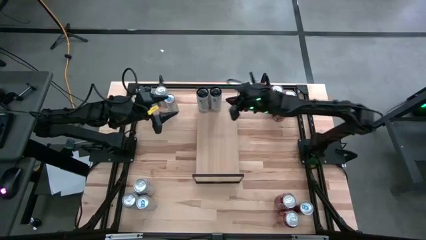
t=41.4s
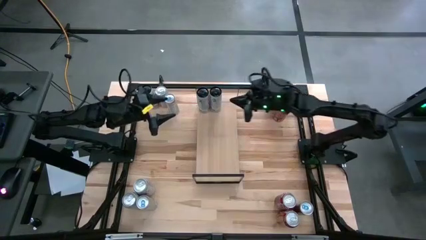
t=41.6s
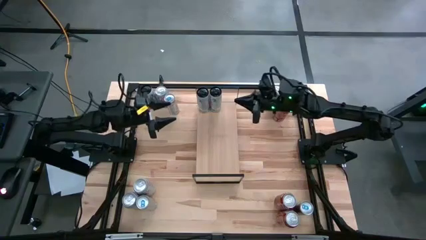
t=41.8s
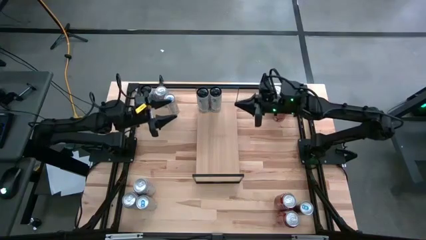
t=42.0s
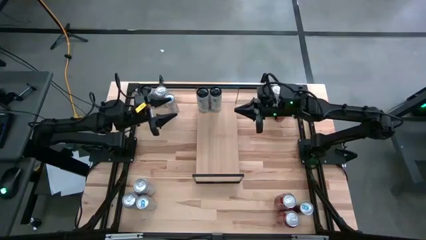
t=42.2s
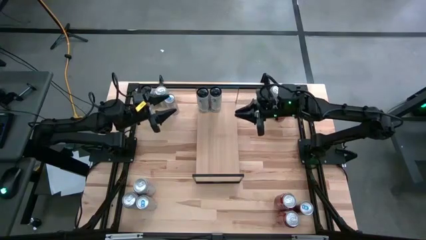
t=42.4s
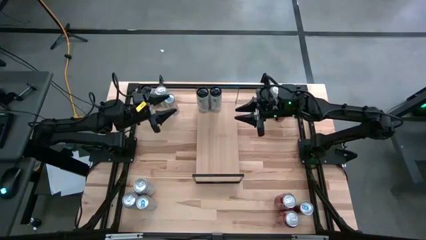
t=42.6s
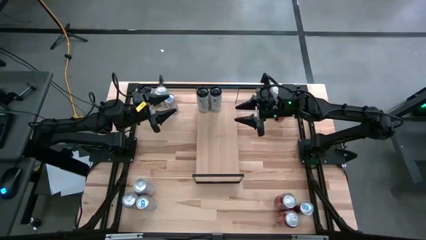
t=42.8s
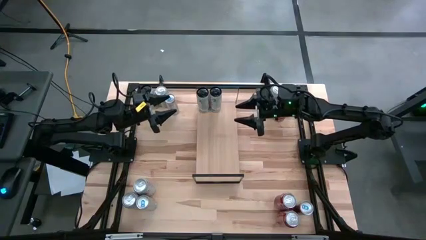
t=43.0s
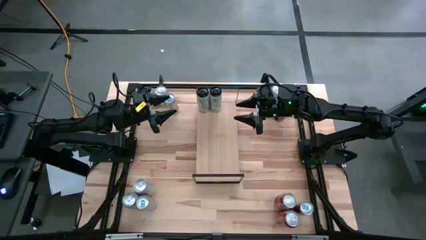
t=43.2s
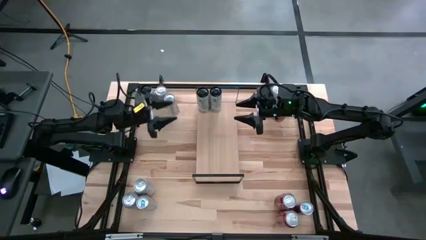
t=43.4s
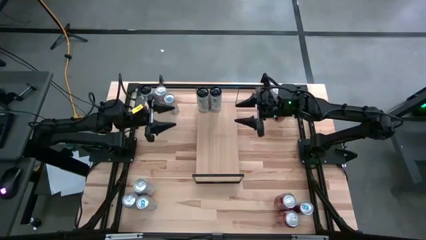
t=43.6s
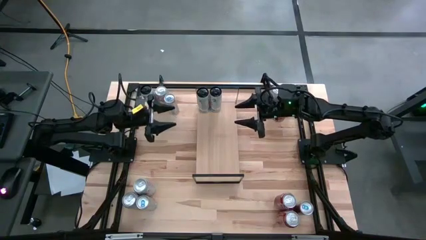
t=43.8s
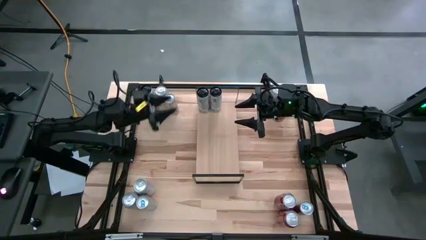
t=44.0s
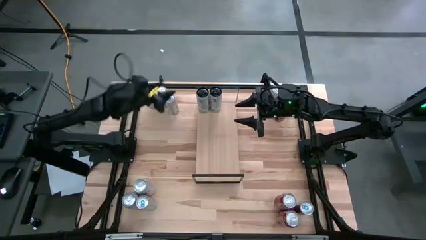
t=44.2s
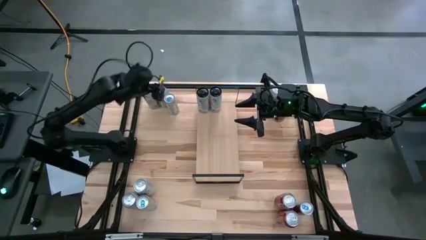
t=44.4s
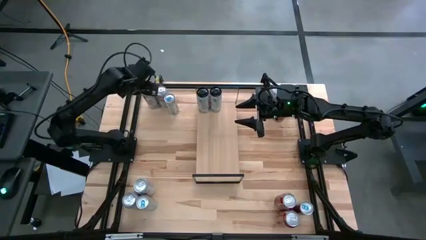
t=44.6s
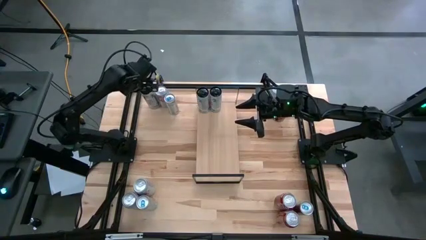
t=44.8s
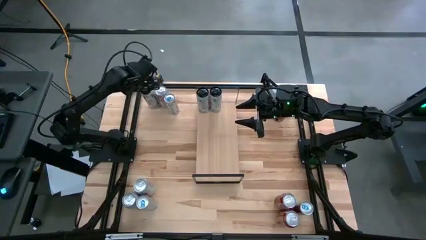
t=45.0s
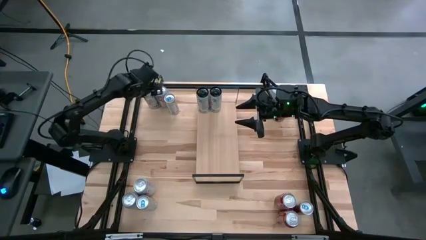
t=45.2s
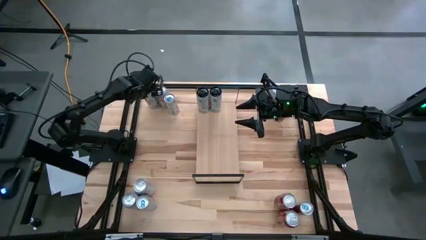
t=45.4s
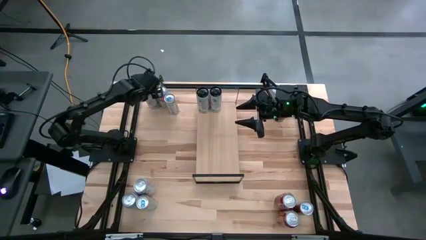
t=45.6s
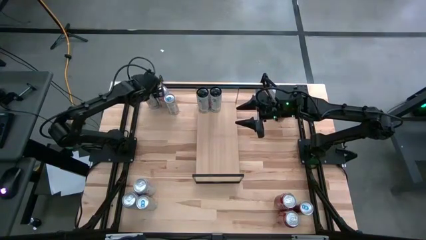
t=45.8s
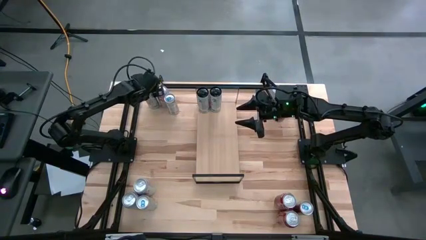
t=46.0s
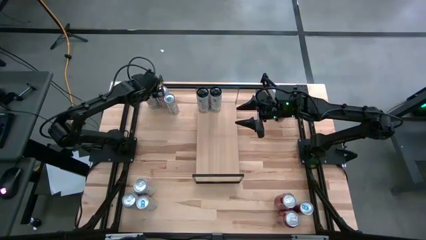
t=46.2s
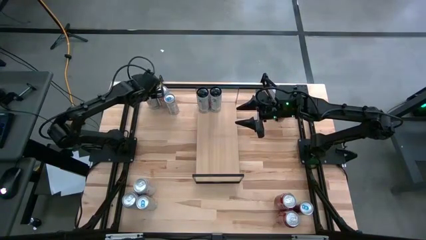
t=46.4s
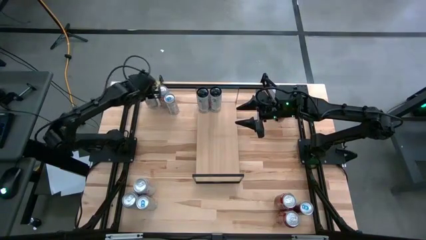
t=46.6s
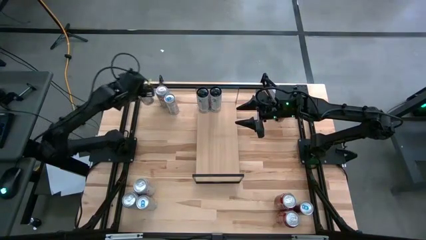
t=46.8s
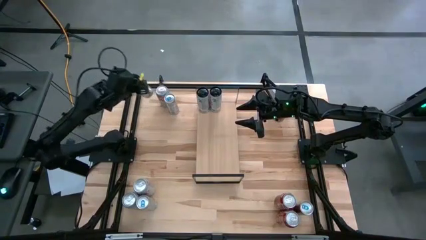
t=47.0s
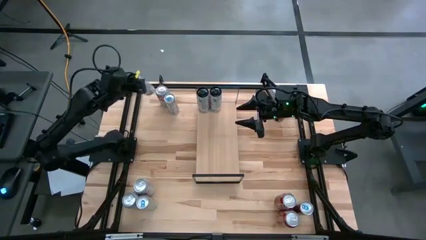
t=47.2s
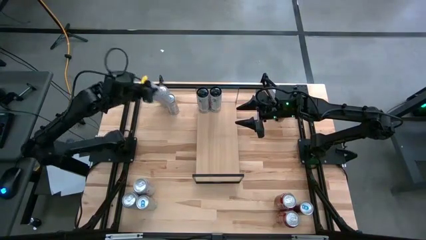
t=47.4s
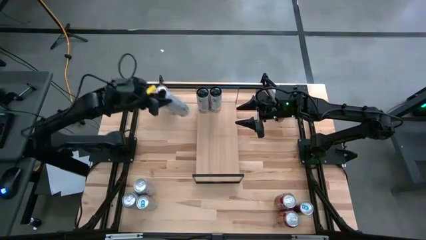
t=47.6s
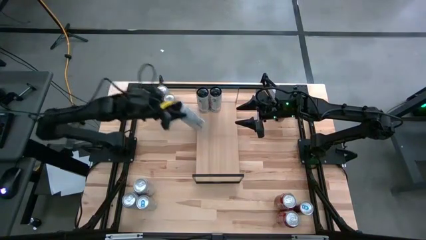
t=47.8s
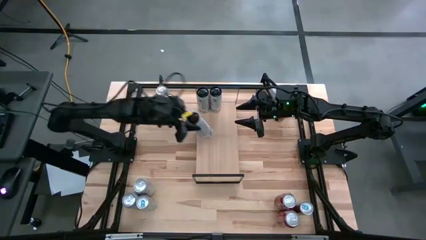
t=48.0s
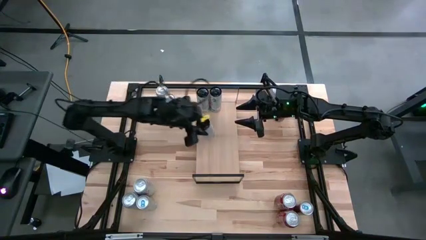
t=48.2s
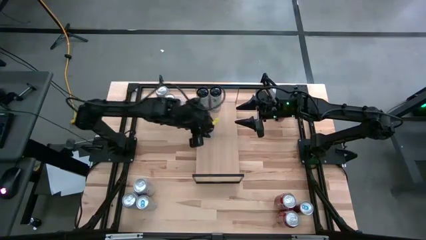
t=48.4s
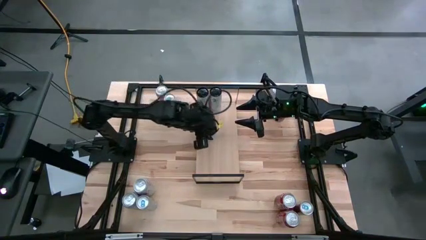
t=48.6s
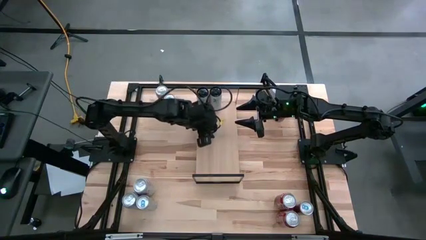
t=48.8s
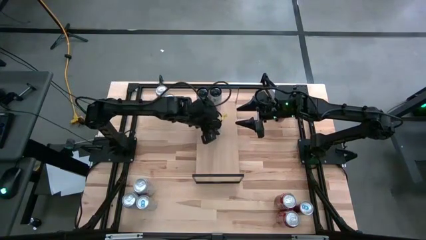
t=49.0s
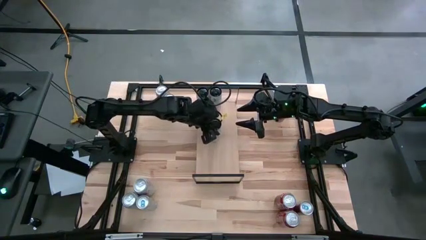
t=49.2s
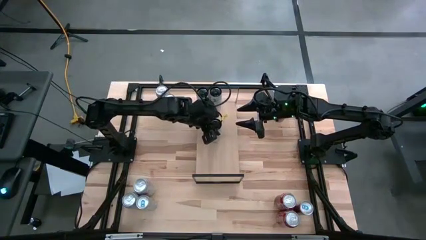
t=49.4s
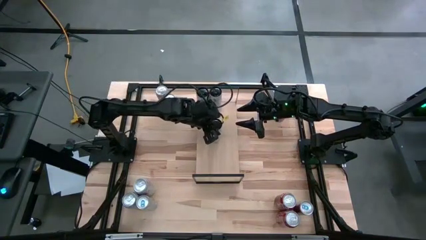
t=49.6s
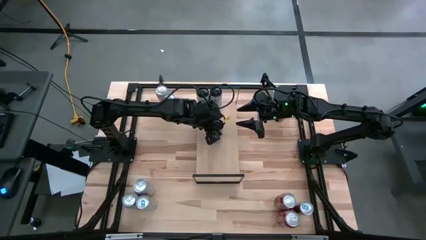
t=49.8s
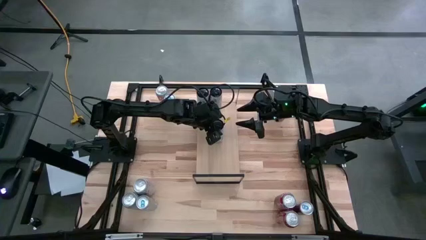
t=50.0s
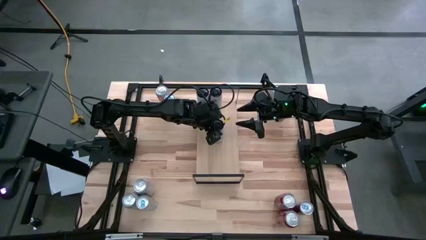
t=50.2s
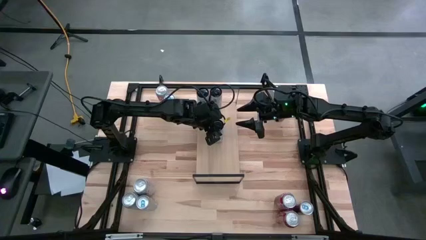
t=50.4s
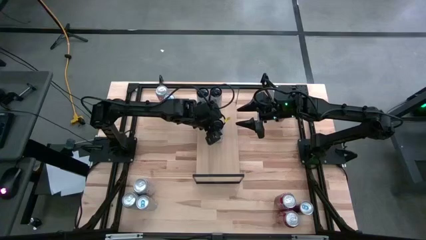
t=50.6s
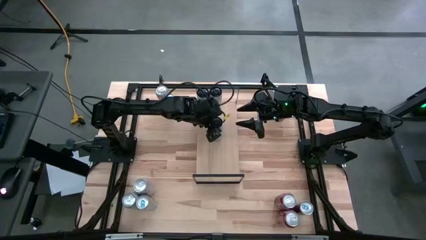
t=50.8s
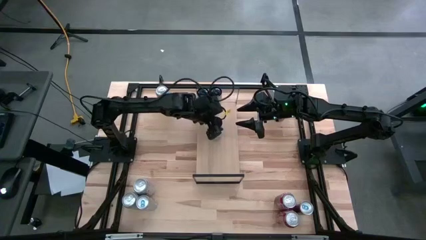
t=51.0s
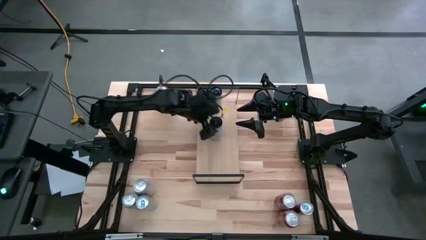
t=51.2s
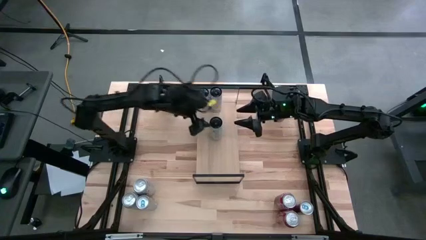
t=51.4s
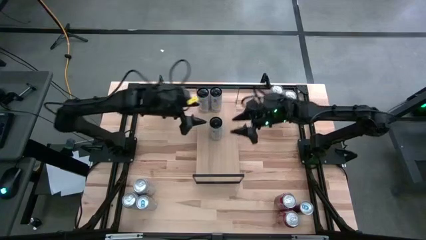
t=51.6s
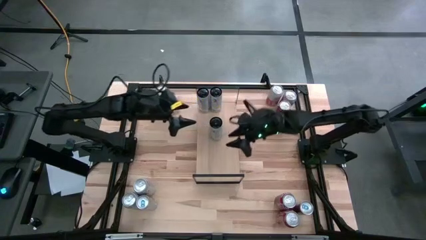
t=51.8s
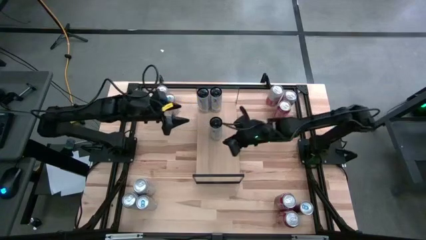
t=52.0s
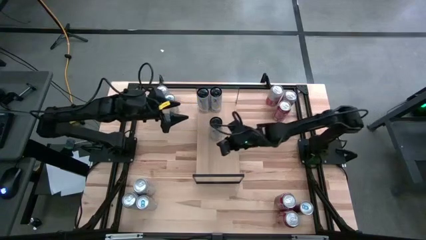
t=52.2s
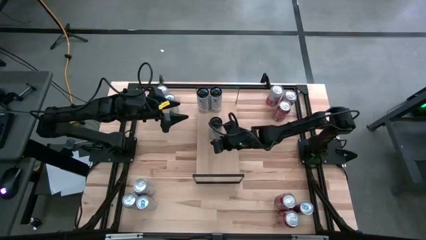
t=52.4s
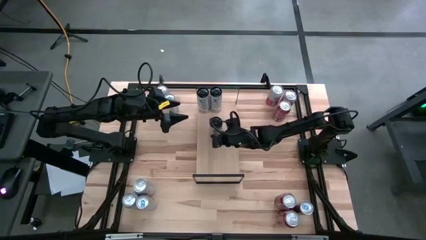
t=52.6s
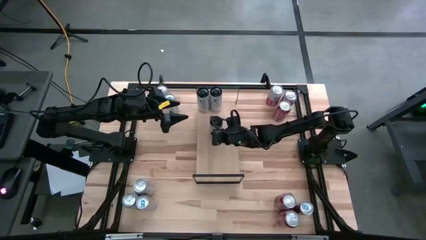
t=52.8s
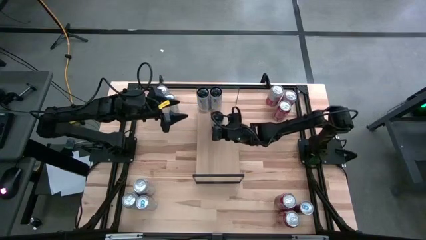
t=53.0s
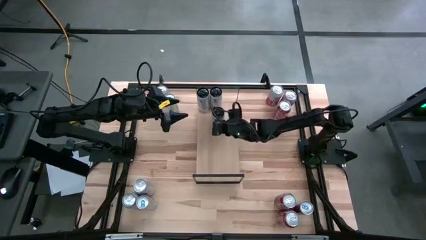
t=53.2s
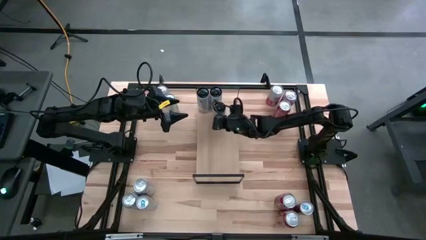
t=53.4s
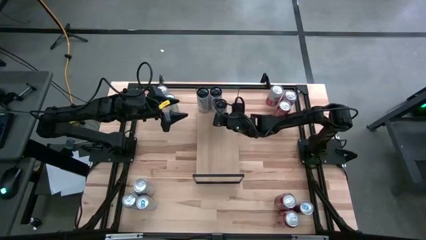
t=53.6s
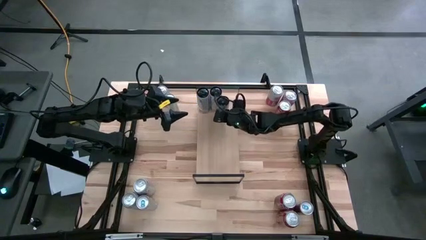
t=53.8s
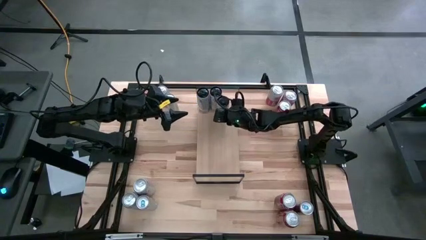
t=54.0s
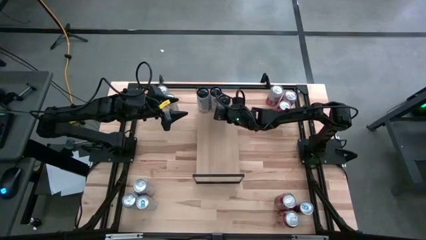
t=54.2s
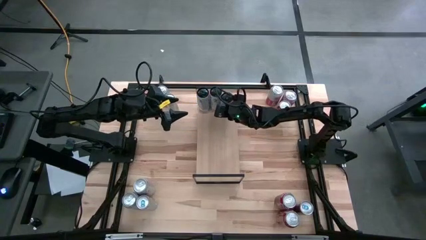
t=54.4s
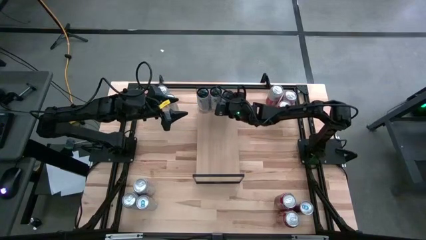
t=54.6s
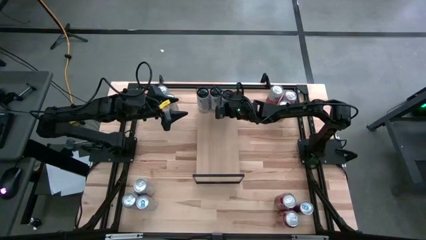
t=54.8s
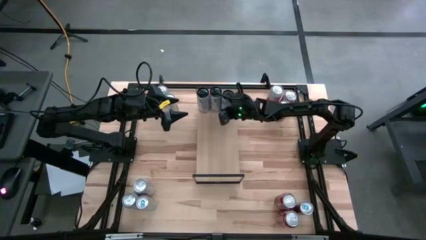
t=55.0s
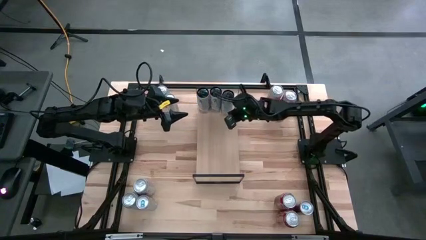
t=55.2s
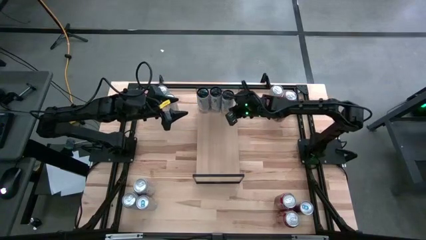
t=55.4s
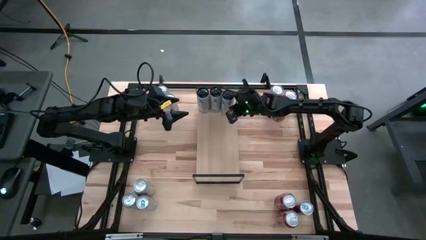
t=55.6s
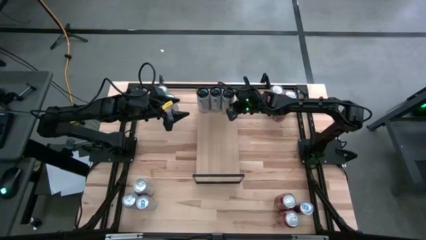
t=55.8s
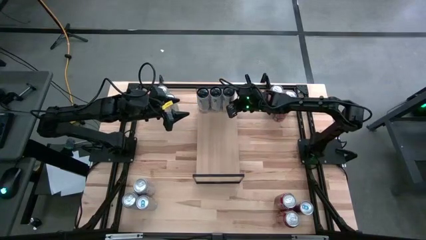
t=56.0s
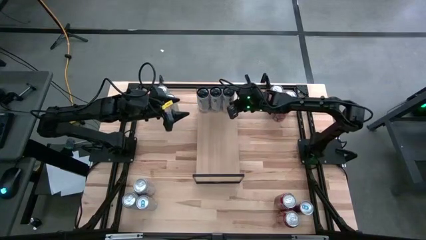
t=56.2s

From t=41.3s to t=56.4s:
Task: Place canned beverage on shelf
Put the white-pink soda can on the shelf aligned with the other white-pink soda can
